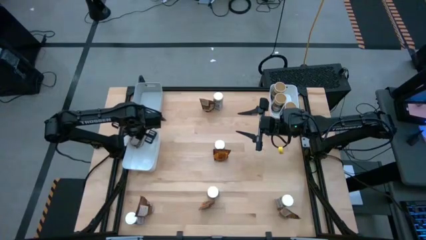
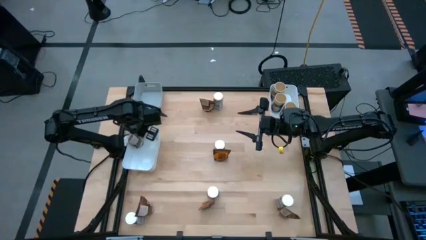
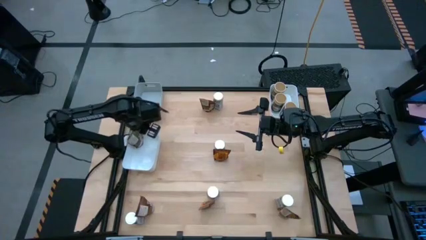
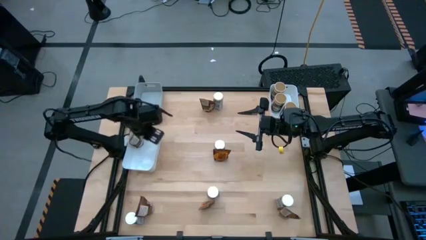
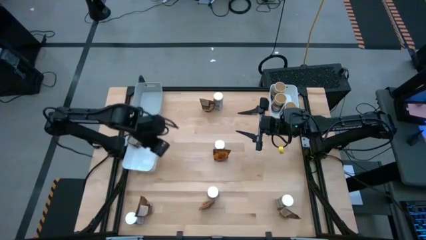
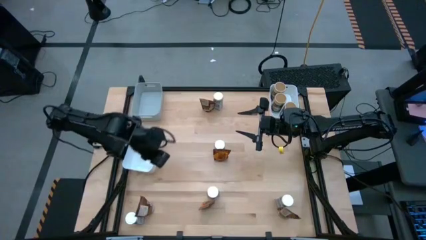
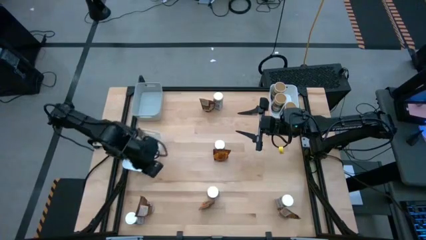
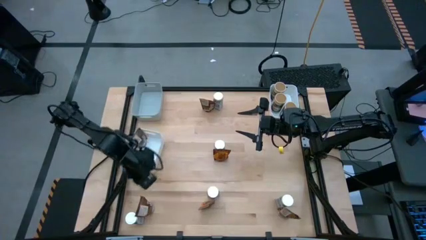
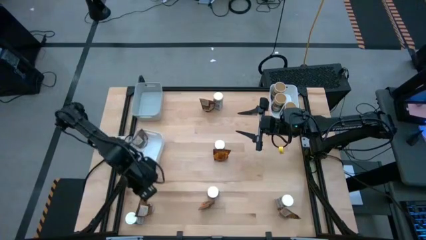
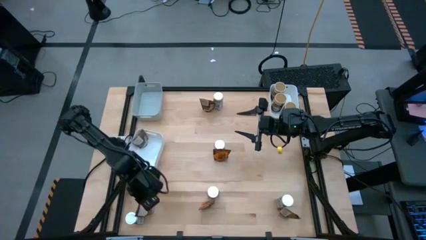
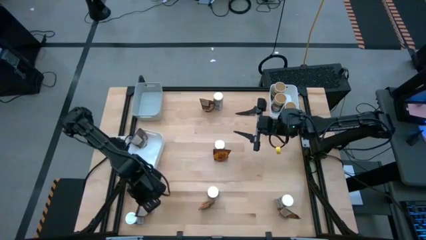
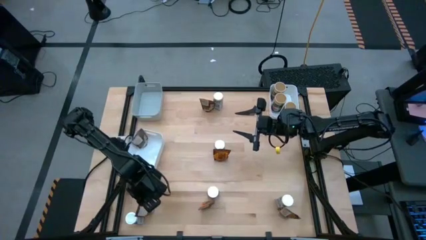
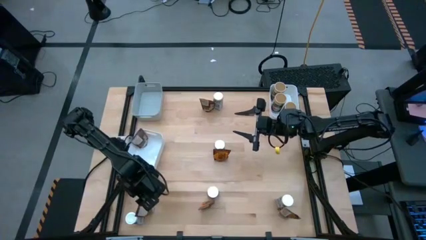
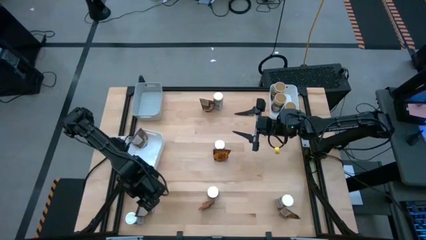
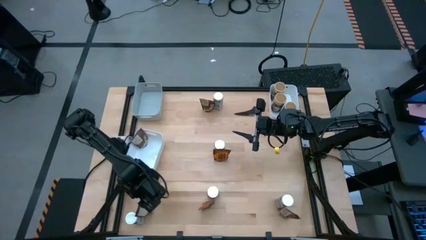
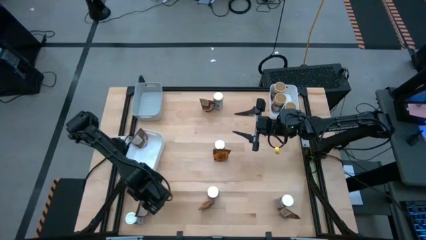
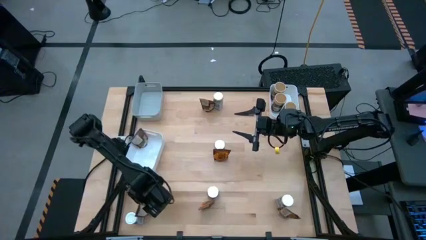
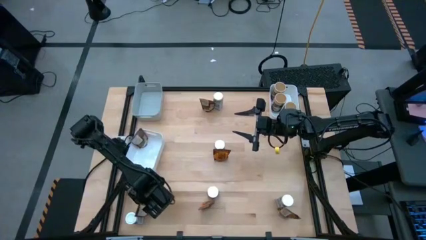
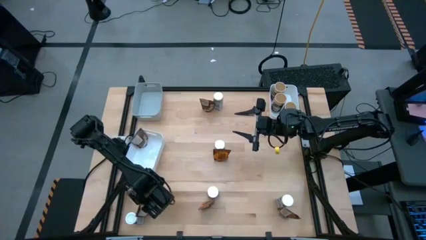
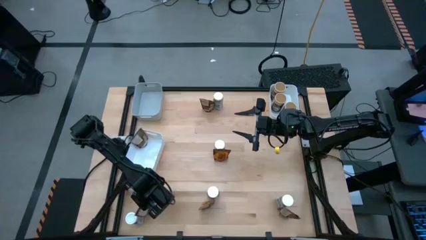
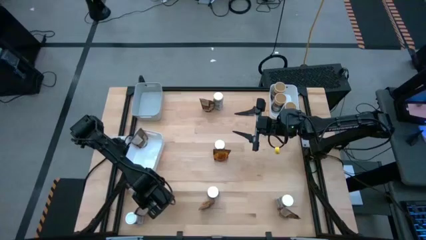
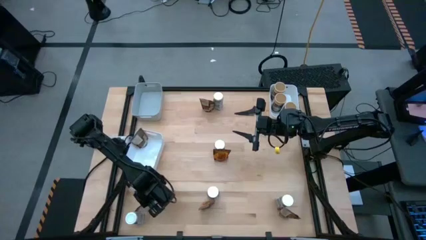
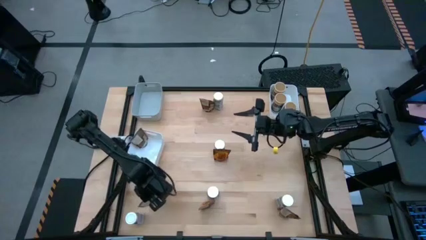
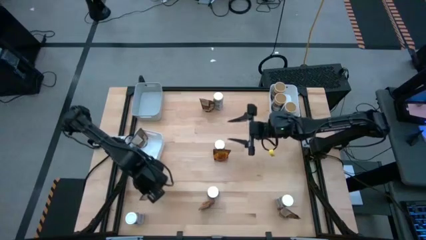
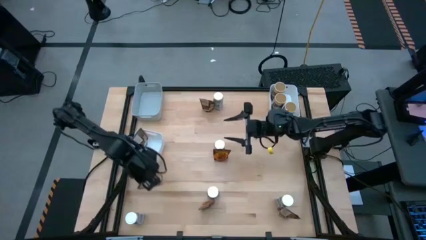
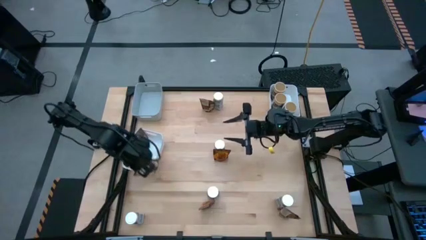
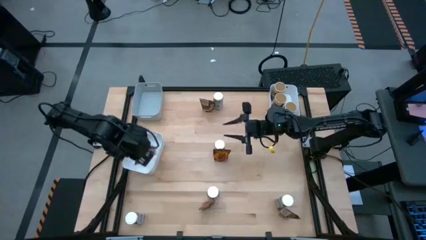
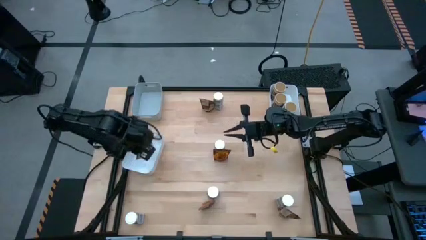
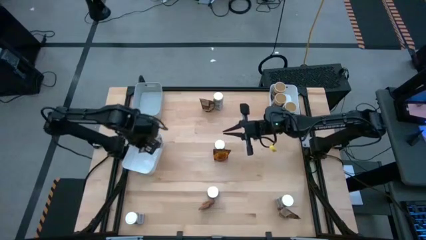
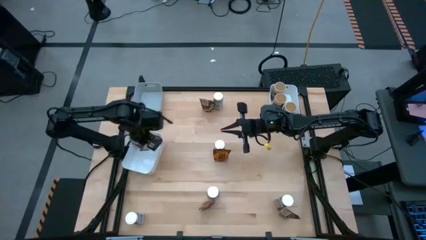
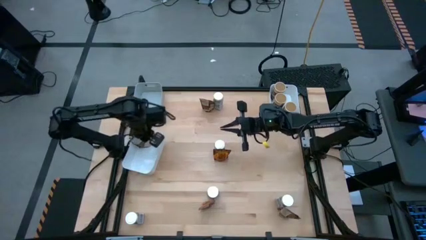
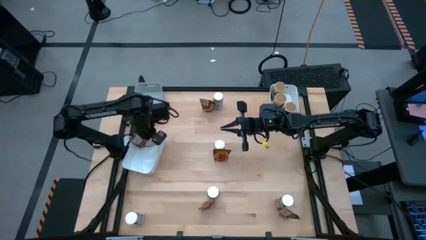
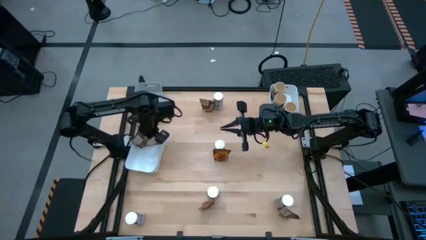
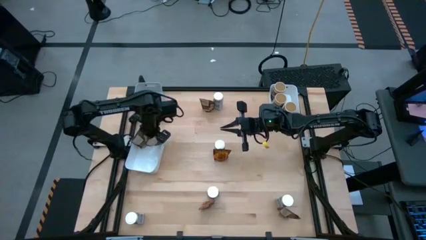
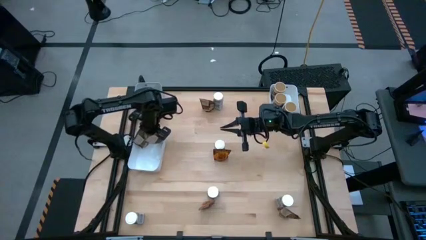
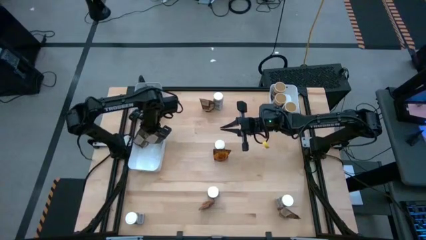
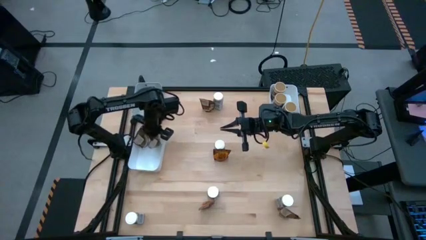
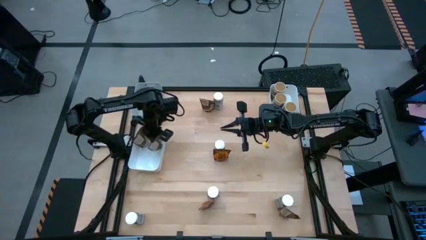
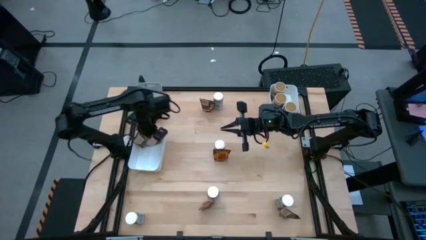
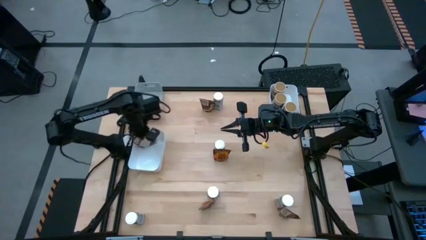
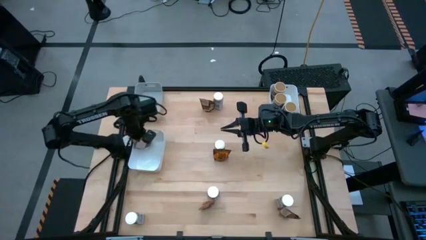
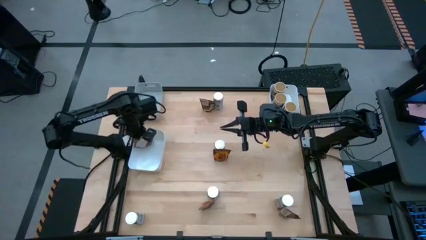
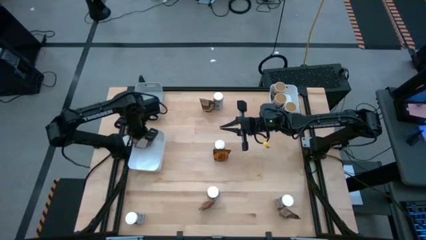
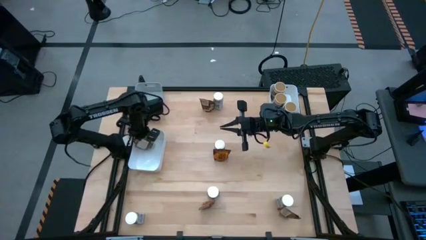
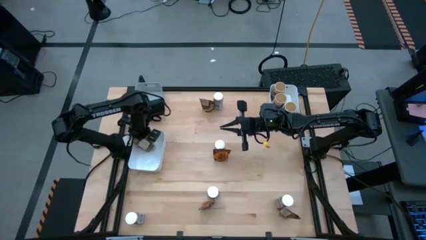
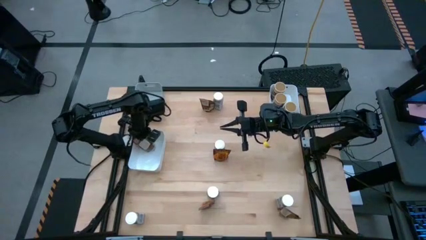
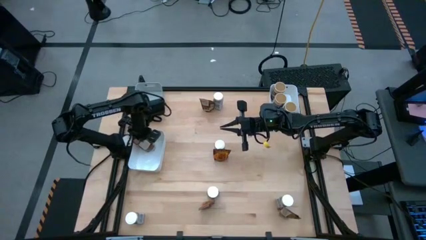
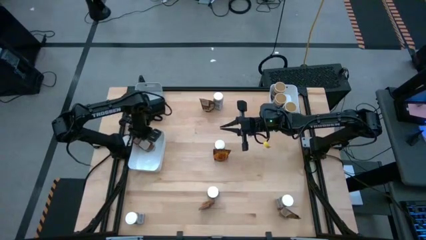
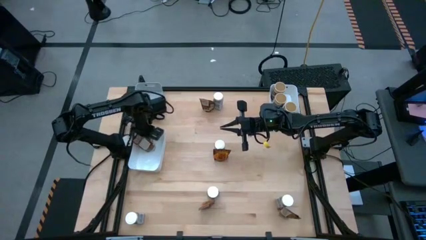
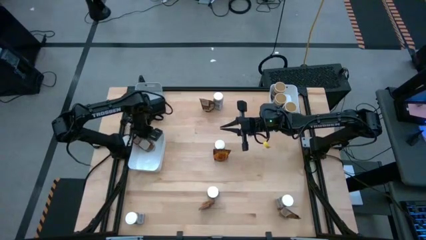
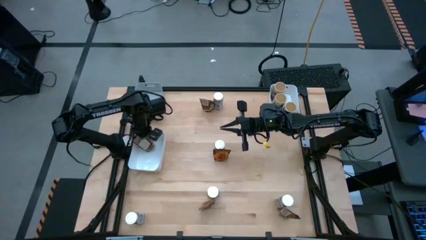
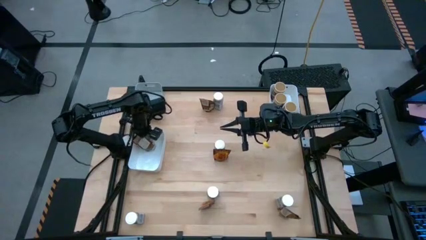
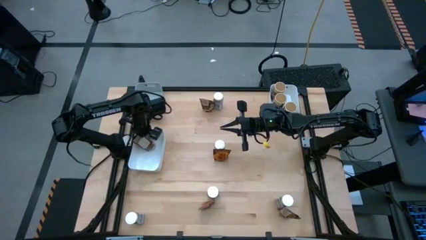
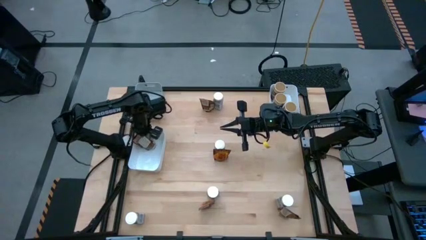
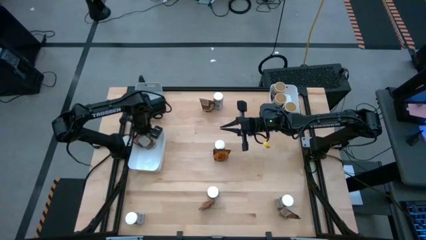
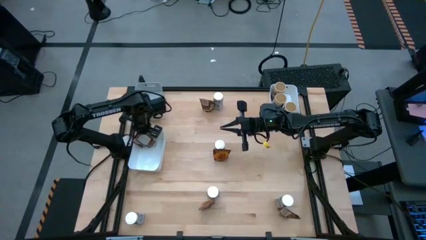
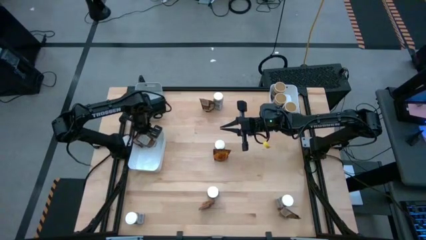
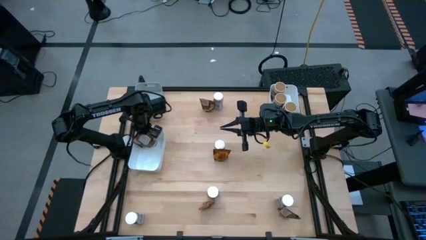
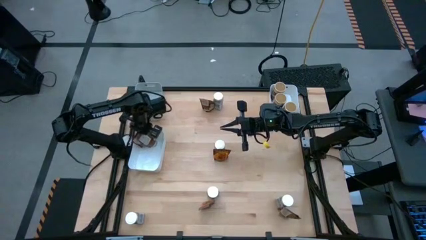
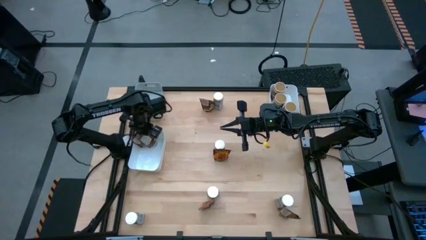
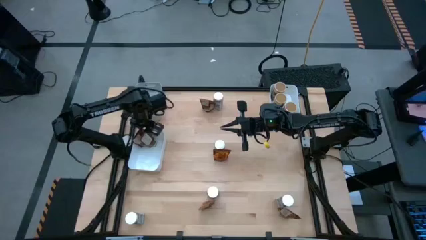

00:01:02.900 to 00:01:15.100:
Task: Sort spices by type
Put the orange seasoning pack into the left white bin
